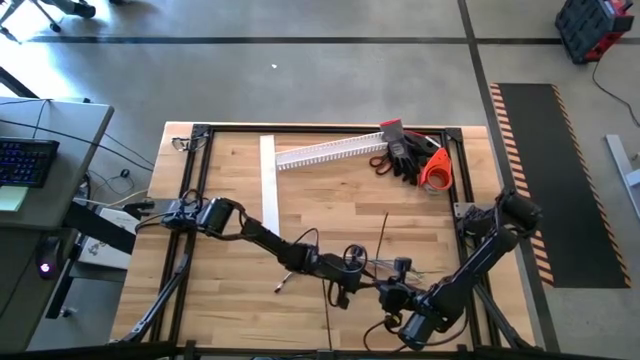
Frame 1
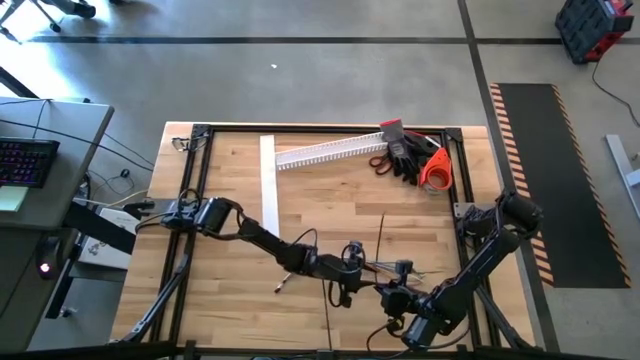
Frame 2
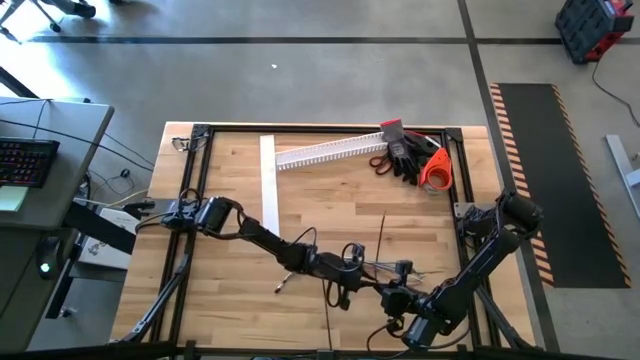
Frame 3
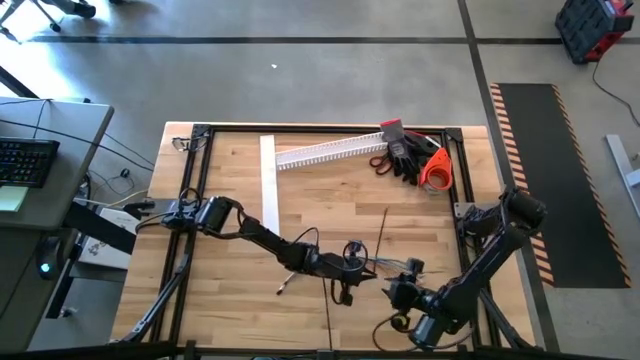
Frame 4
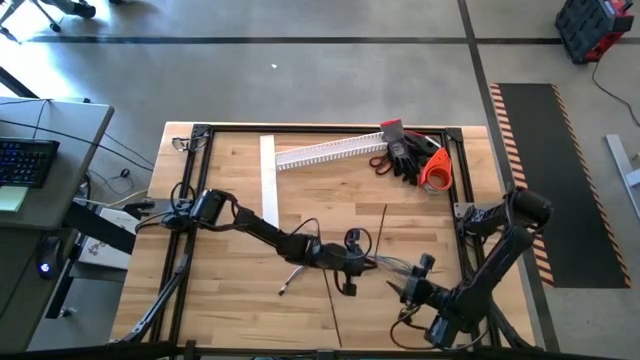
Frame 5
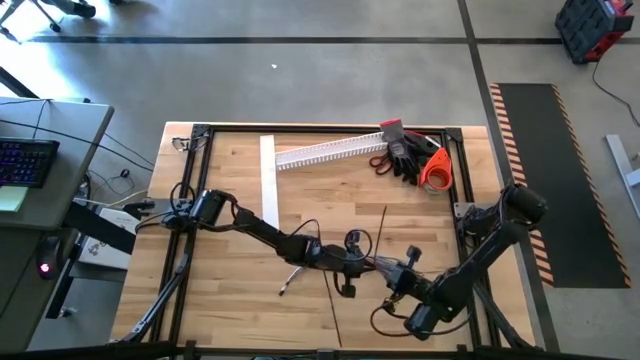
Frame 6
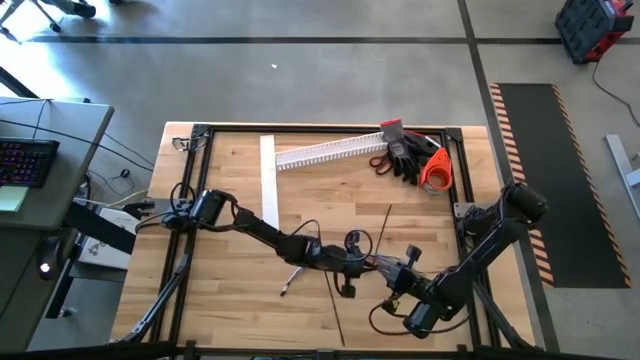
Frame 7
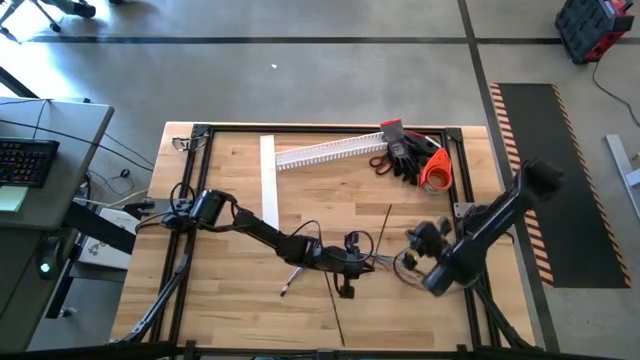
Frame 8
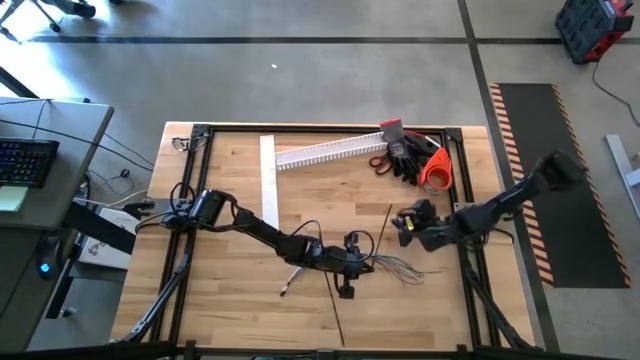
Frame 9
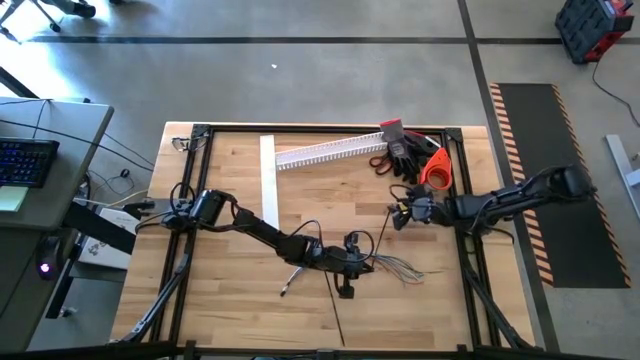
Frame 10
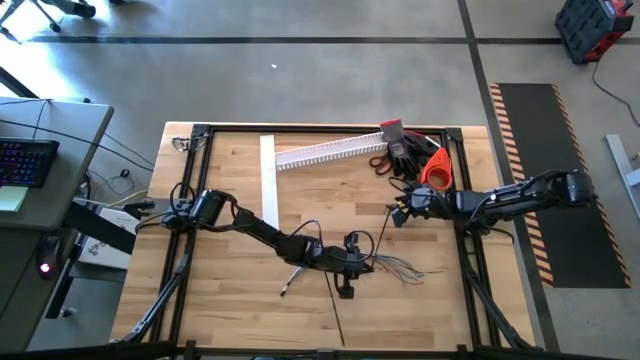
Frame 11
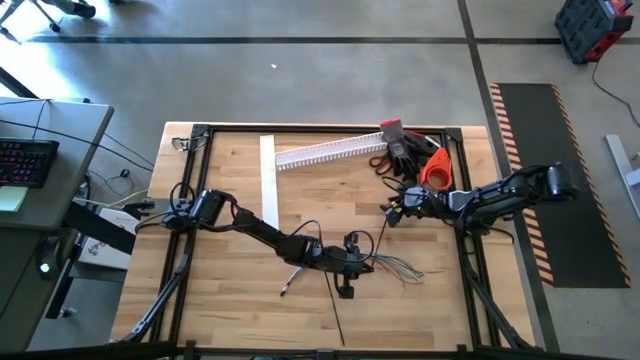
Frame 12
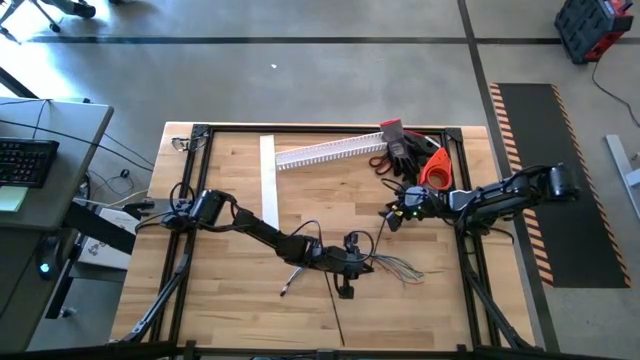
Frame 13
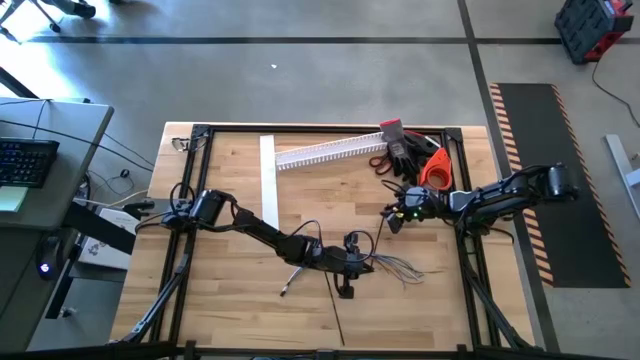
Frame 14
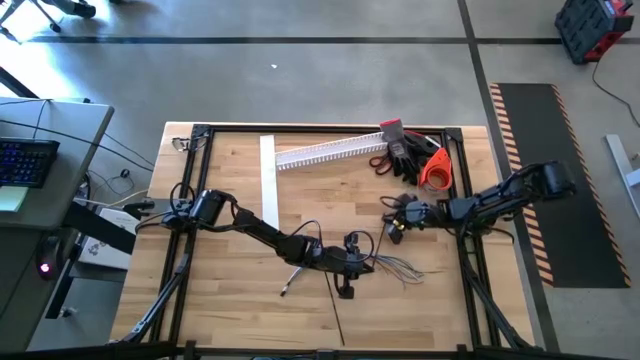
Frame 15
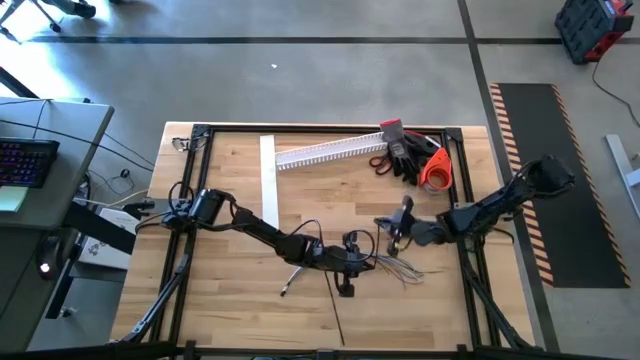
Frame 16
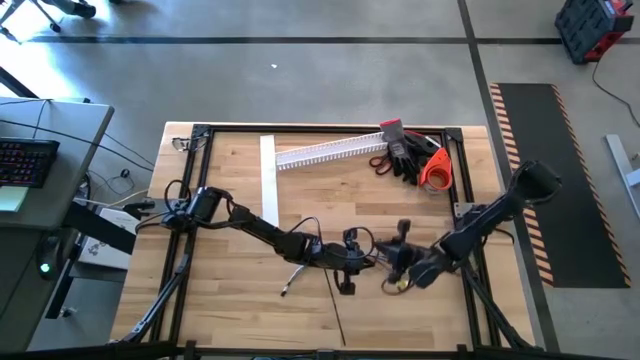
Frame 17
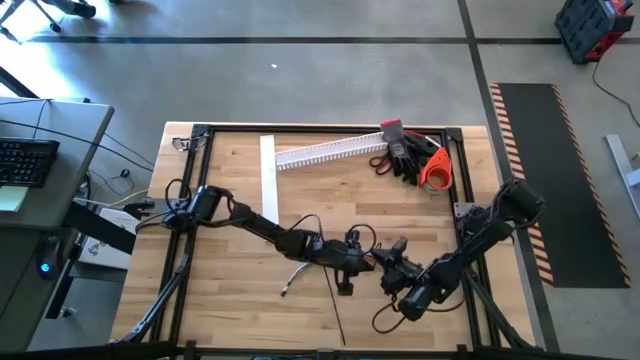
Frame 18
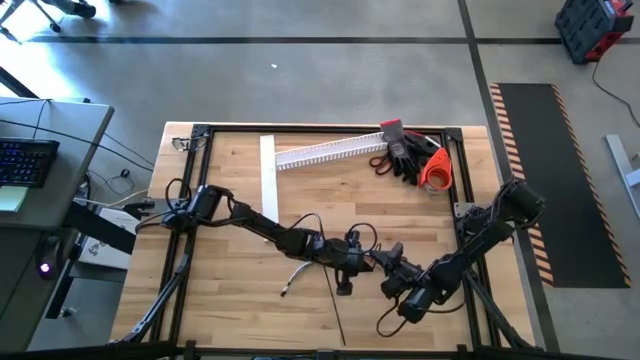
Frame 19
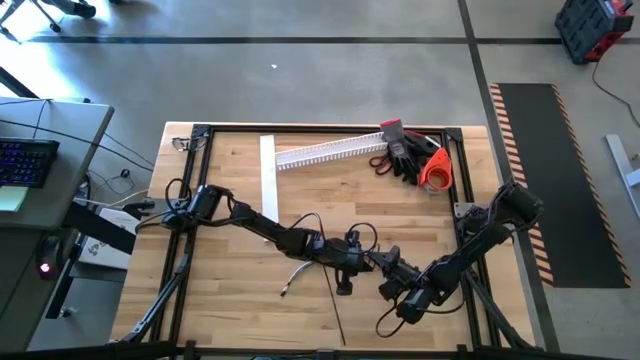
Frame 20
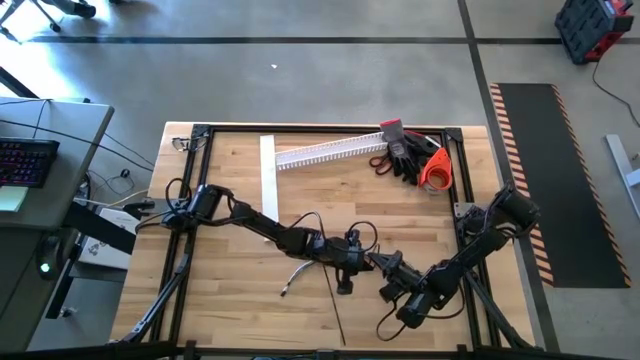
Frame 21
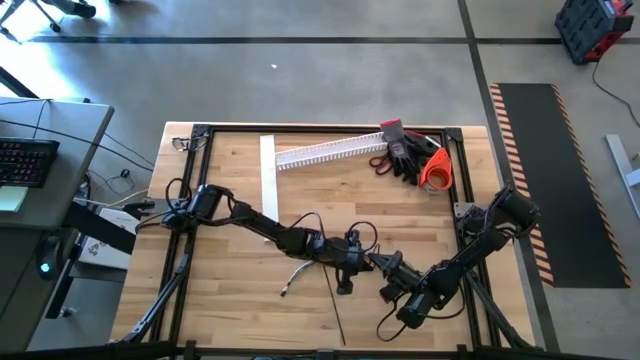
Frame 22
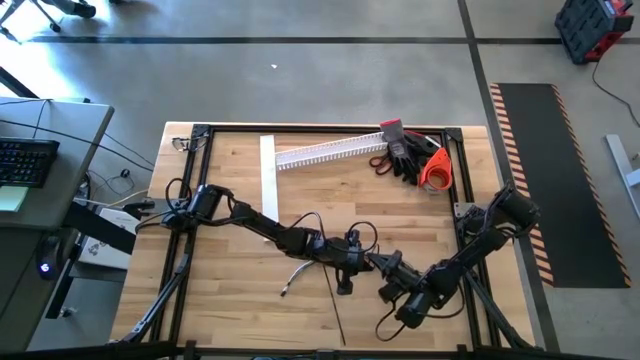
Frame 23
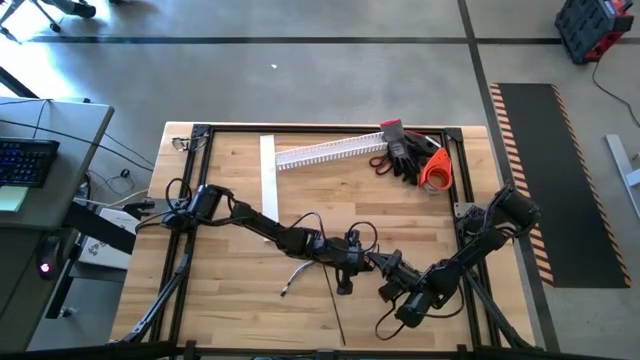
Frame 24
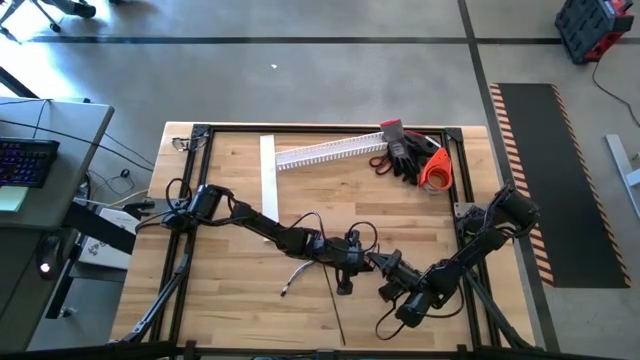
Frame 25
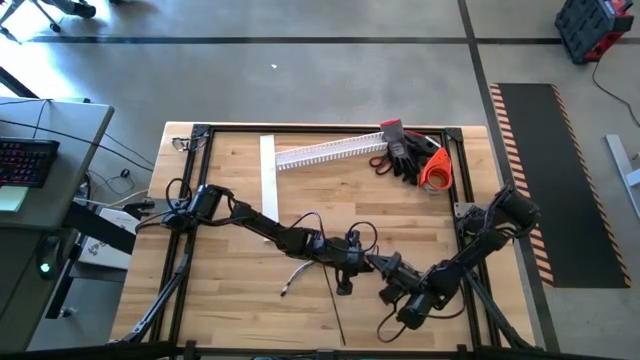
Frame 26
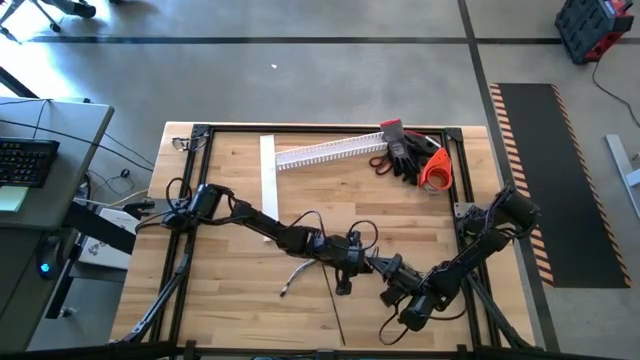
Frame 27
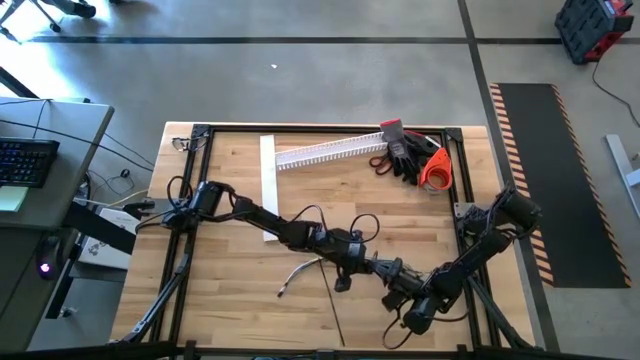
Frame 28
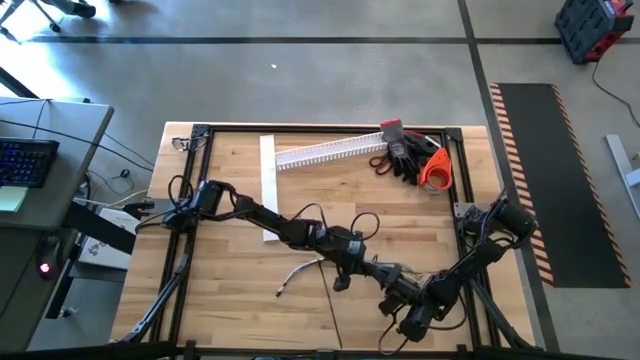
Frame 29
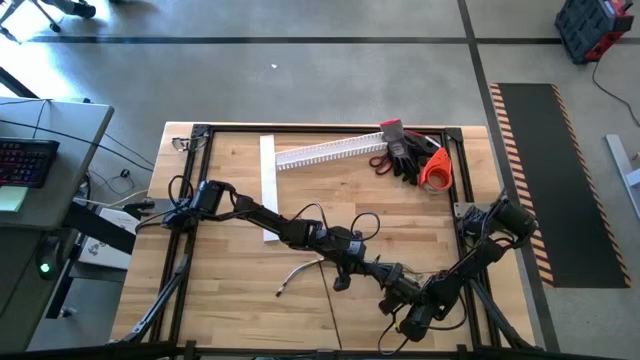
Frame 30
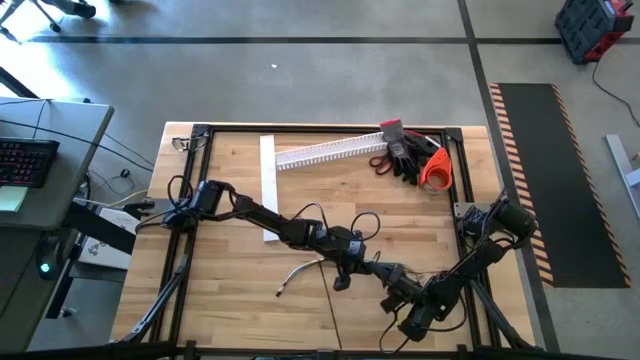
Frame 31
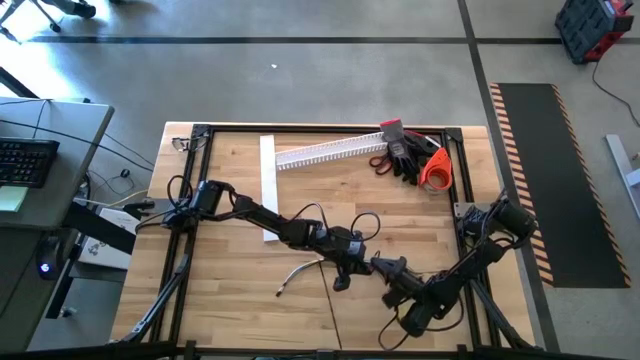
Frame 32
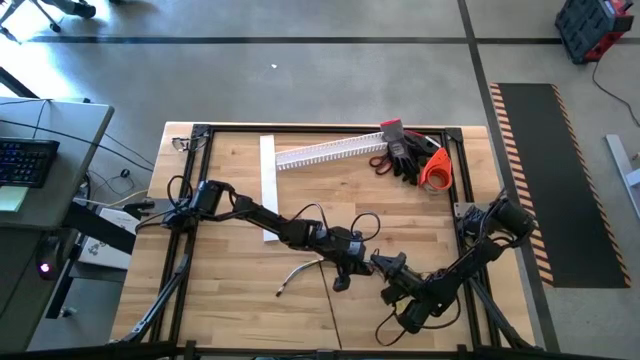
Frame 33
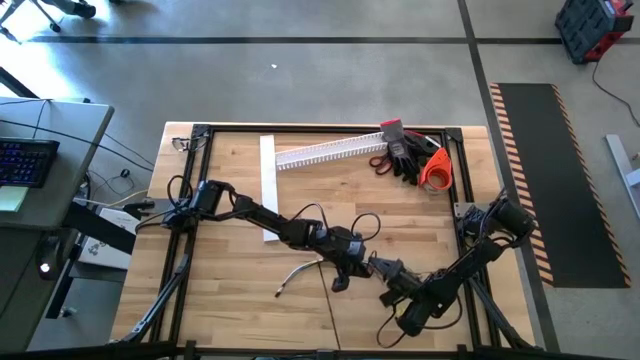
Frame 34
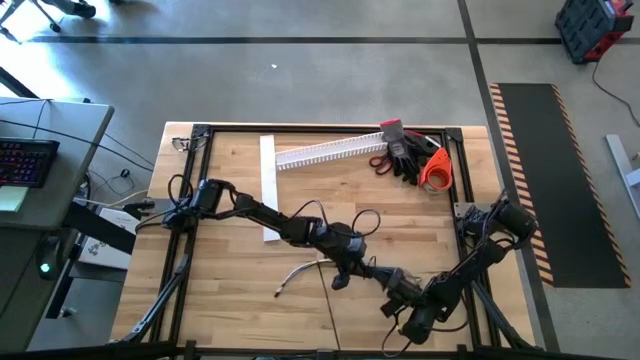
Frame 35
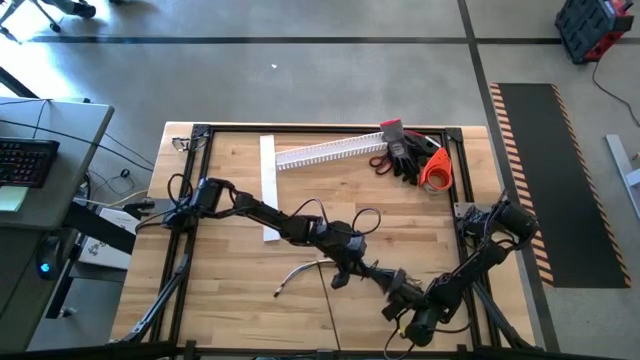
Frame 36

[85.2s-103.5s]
Task: Ziptie cables
Wrap the cable wires with the black zip tie

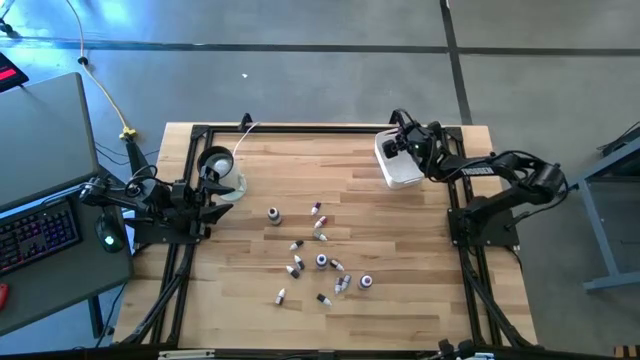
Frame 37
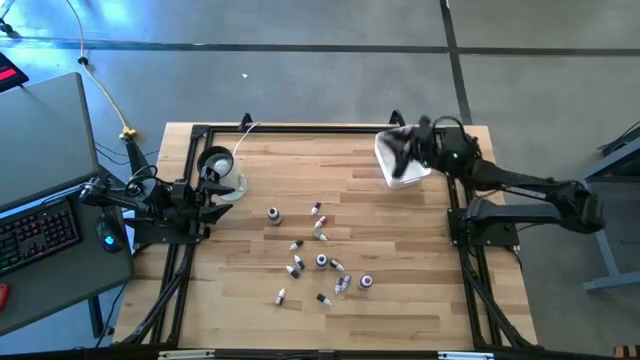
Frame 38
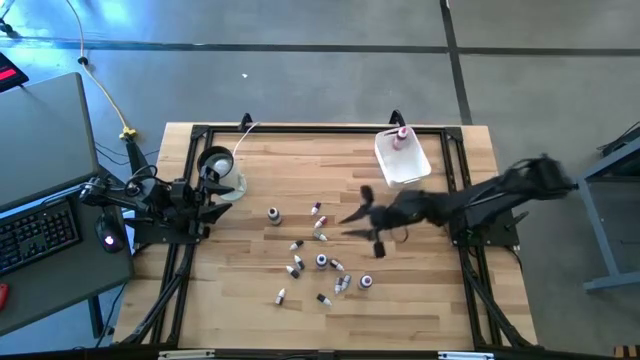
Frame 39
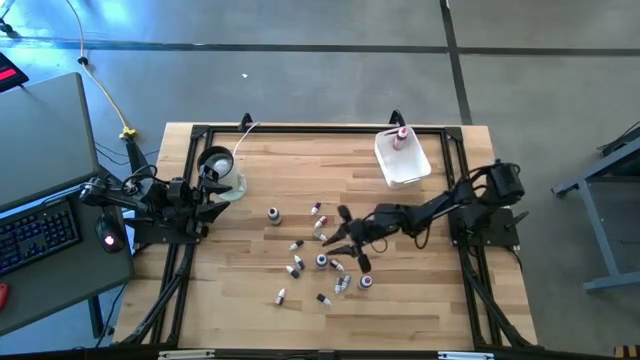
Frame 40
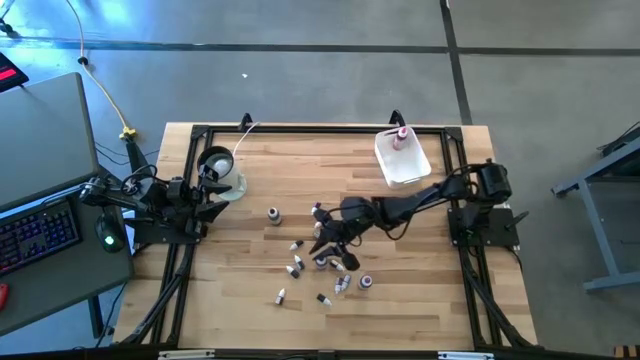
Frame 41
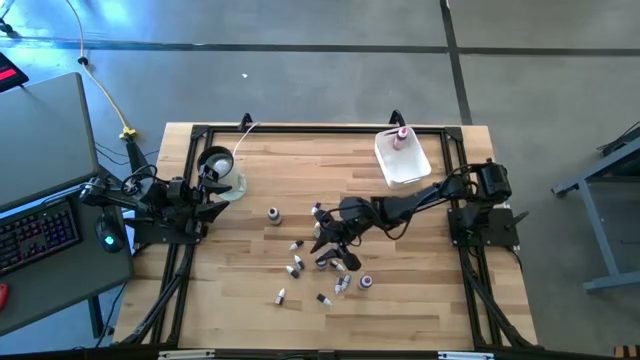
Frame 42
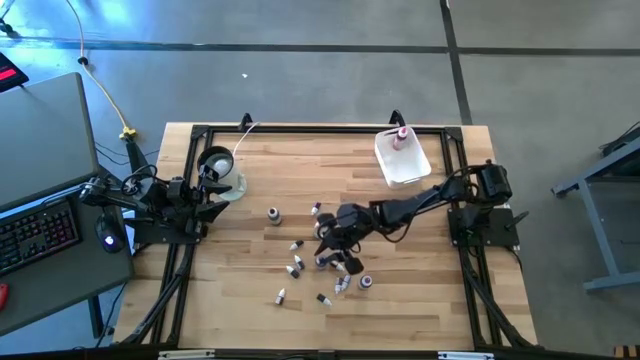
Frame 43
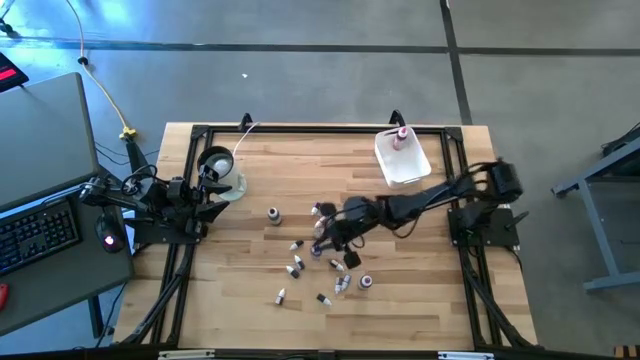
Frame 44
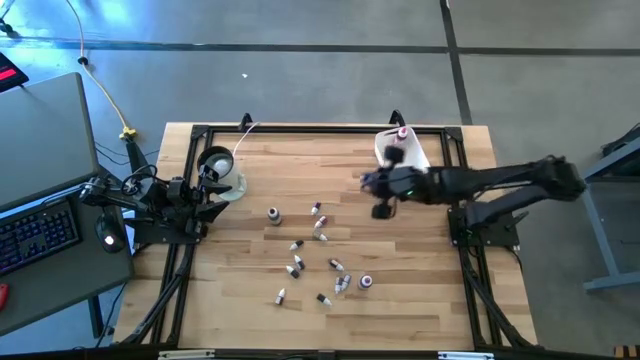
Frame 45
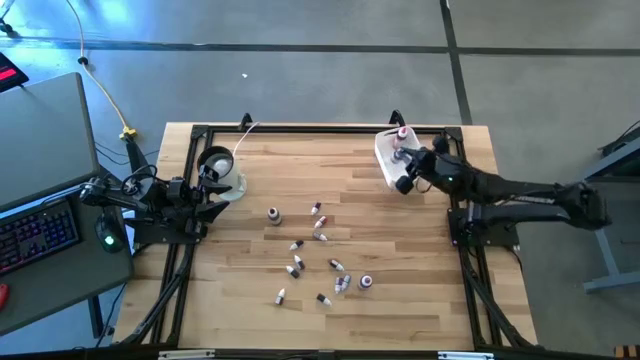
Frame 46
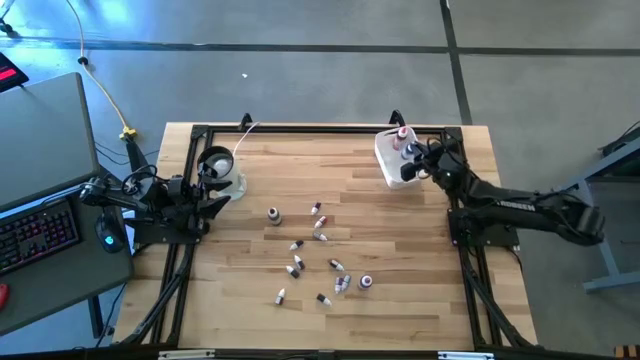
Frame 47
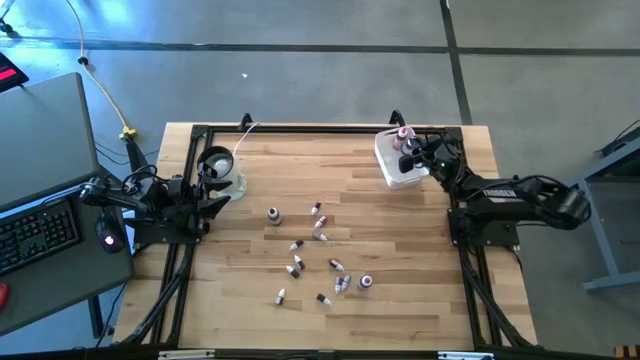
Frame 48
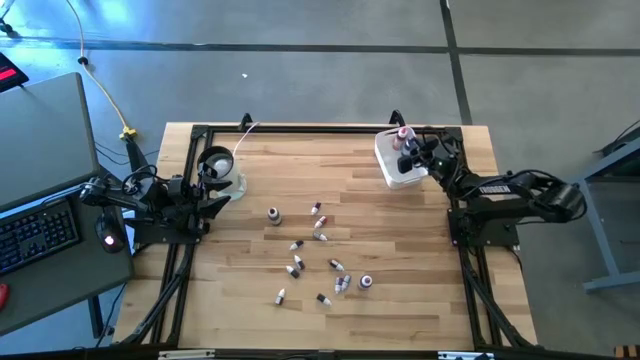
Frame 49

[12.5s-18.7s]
Task: Pick & Place food coloring
Put the big blue food coloring bottle into the white bin
